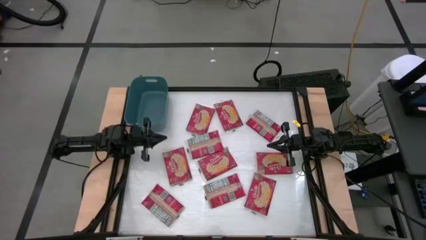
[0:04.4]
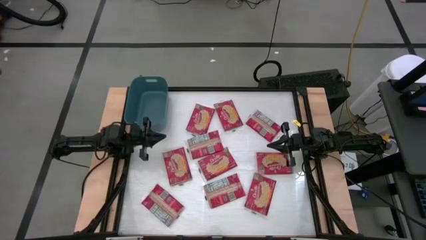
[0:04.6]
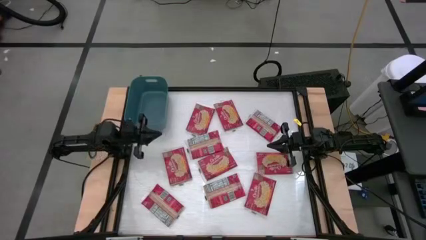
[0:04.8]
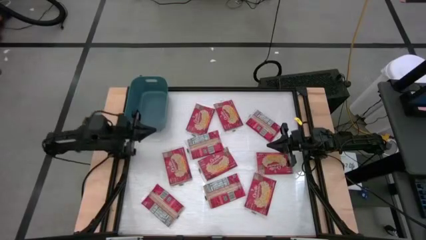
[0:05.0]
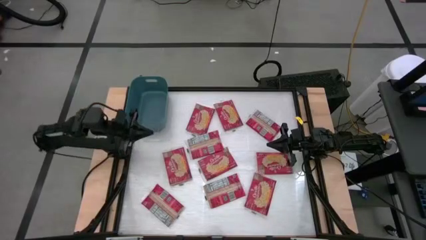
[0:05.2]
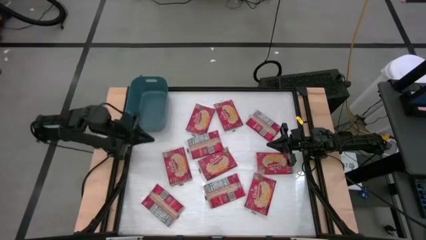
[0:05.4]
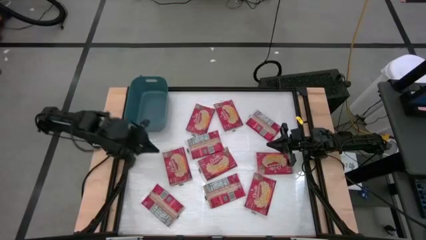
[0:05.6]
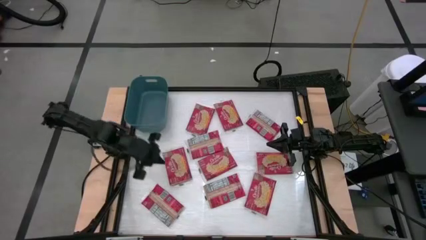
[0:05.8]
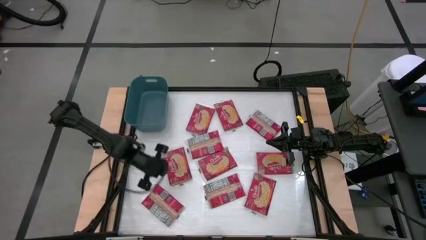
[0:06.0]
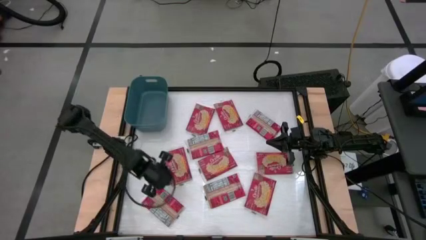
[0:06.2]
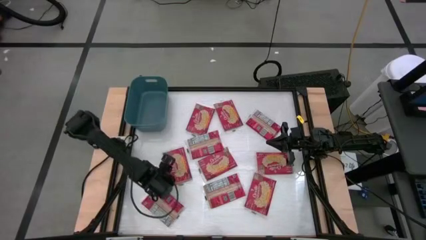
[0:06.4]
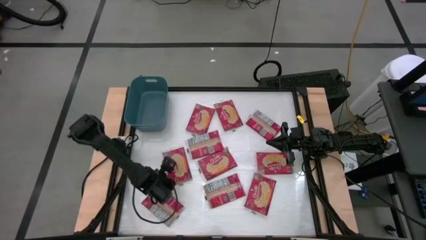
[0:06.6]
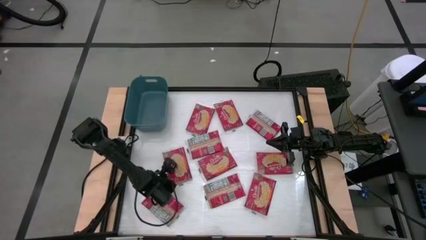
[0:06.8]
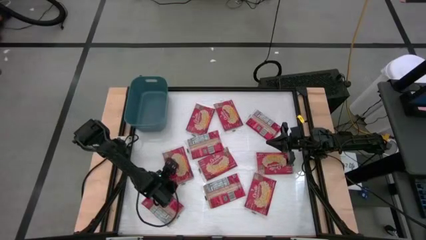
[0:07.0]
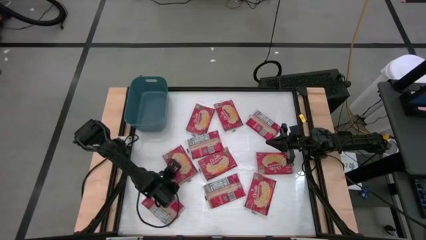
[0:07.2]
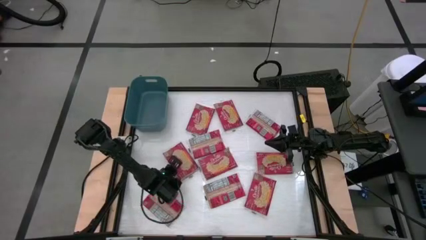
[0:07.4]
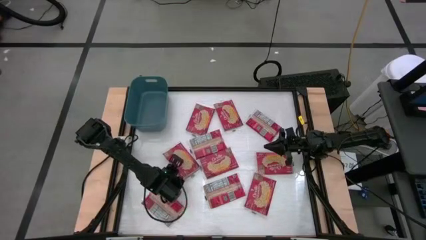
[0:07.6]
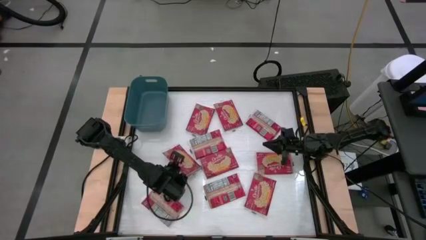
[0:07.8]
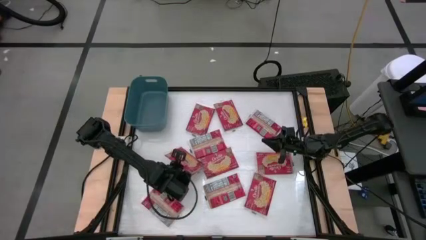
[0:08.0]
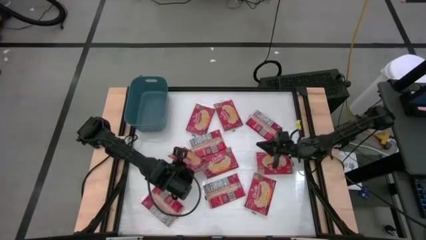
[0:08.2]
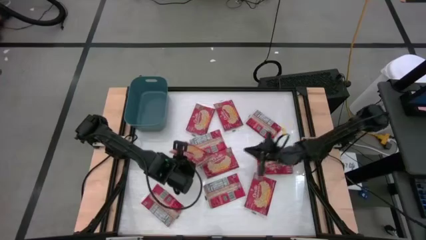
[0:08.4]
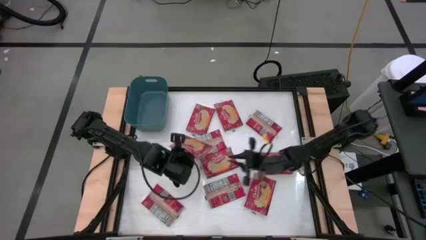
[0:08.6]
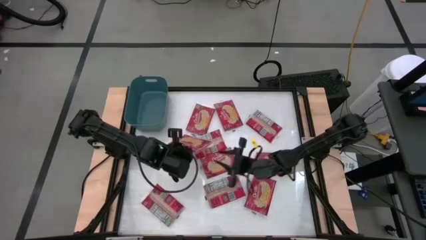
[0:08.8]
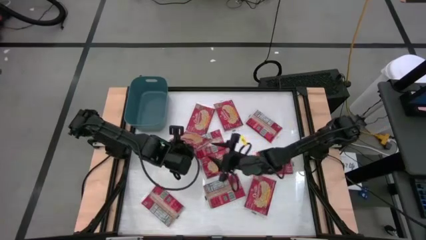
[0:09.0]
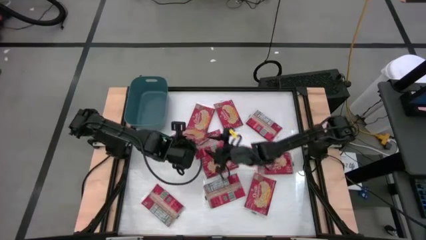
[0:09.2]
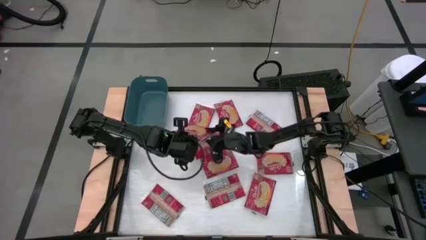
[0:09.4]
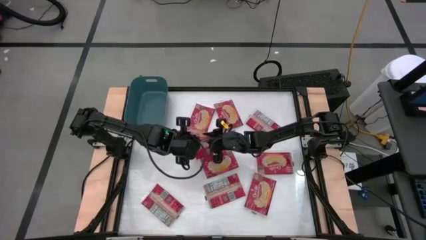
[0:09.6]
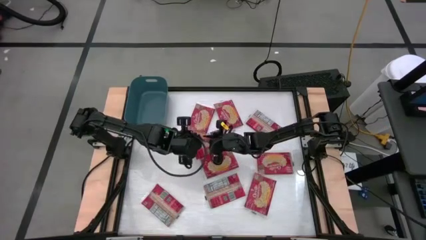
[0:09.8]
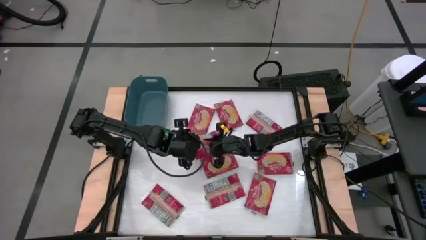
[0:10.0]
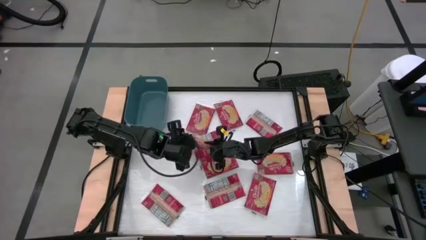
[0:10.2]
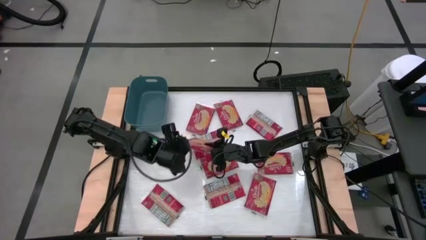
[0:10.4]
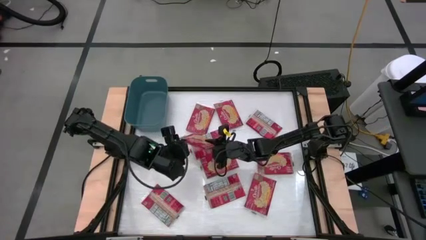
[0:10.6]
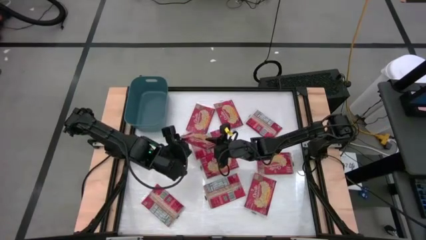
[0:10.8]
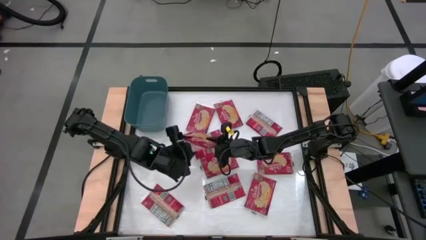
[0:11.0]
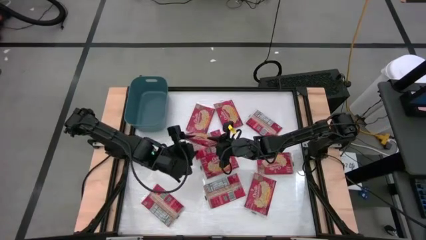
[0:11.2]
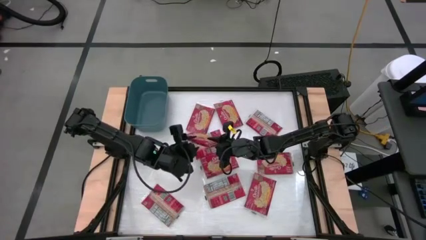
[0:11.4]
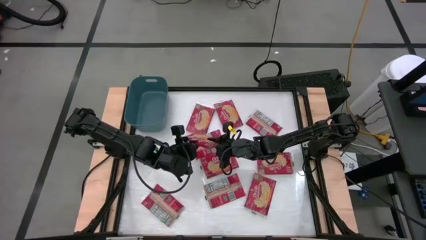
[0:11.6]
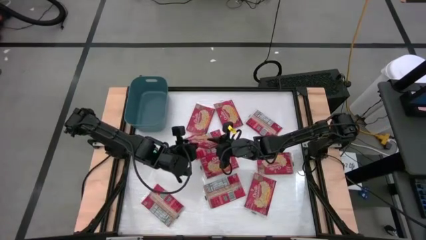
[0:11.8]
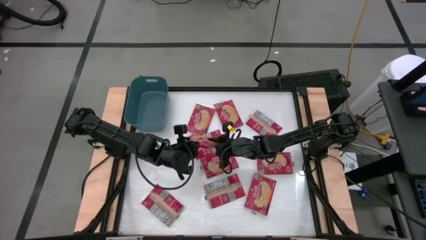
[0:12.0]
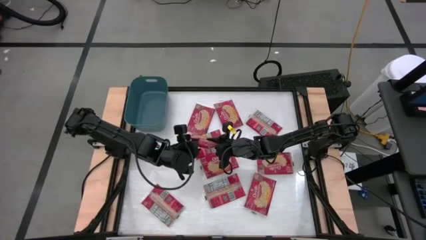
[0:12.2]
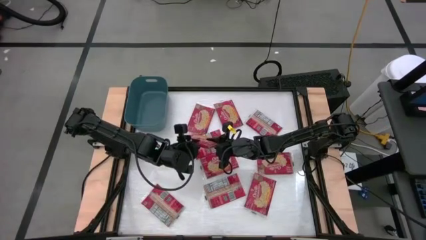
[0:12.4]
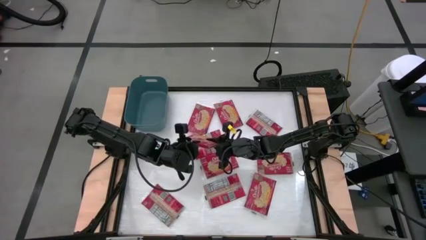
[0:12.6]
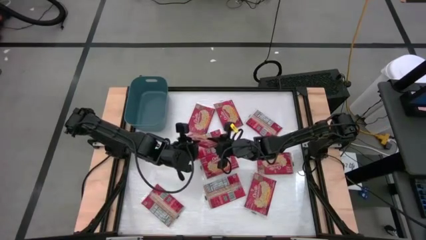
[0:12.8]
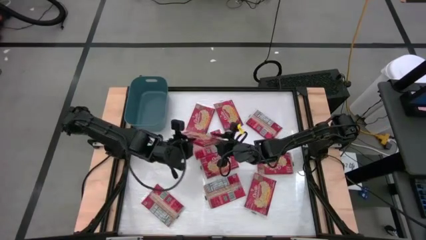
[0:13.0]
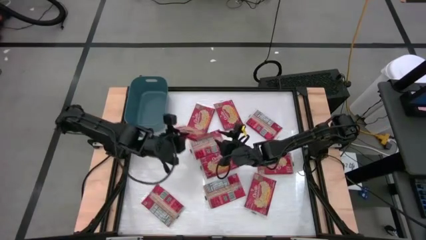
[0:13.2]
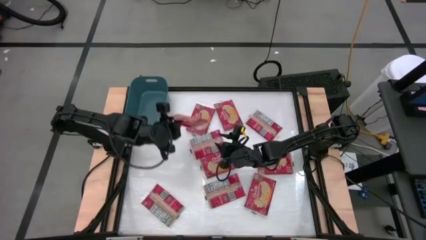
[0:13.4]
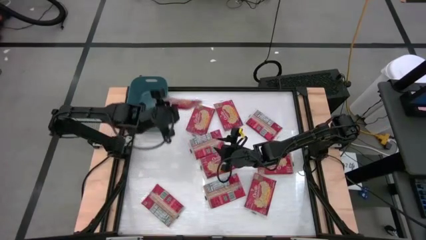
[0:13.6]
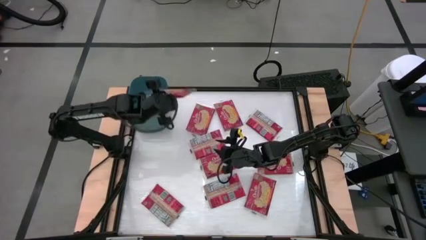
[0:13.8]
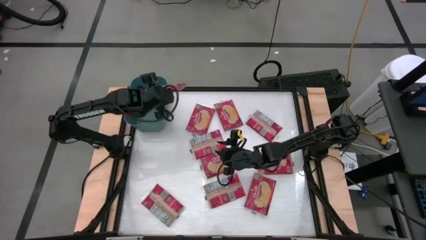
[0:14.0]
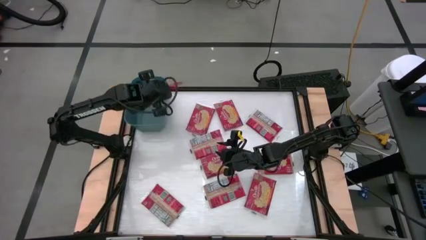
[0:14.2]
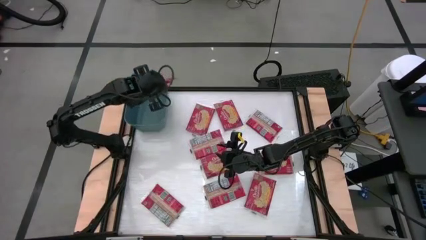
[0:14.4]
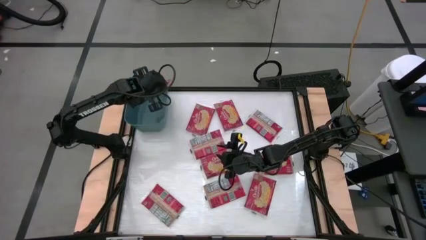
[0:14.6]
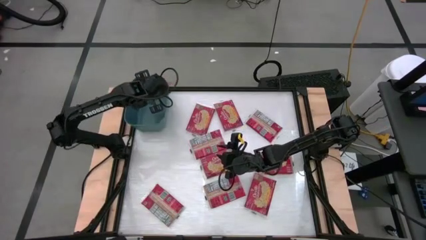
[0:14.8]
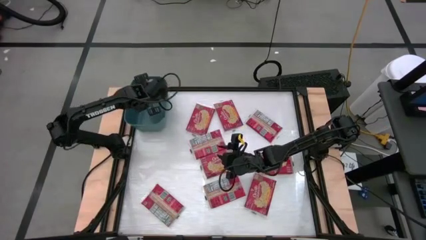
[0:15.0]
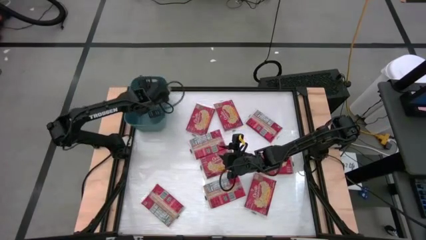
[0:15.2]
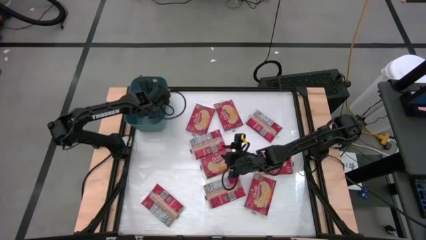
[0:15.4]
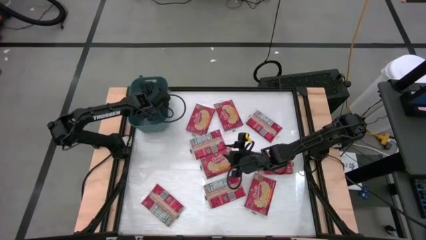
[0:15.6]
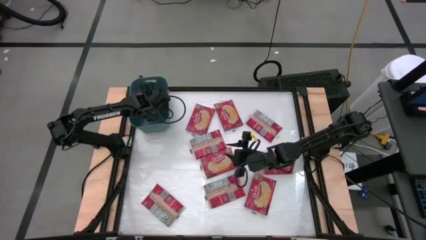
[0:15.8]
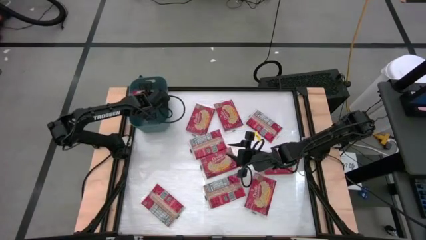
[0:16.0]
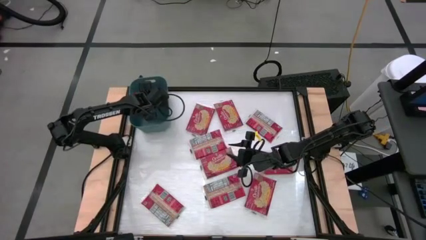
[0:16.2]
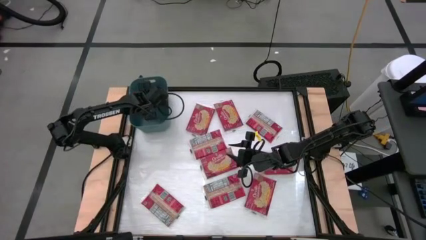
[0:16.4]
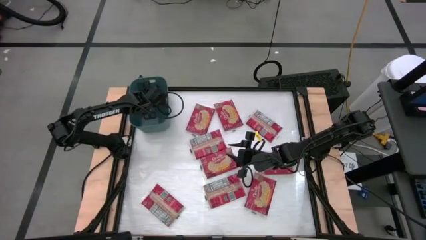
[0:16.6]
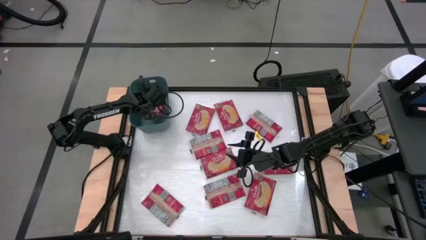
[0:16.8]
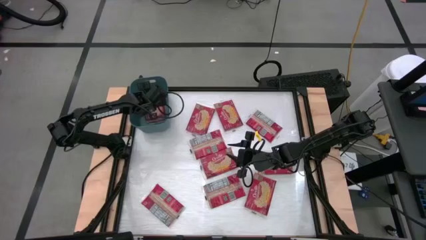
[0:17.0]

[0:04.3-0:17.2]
Task: Sort popcorn bags into baskets
Put the red popcorn bag into the blue bin

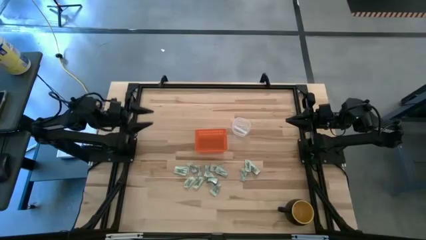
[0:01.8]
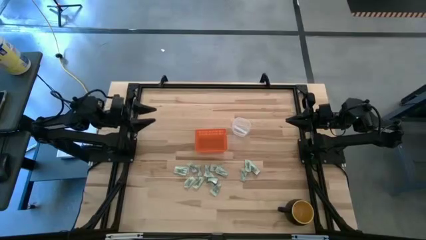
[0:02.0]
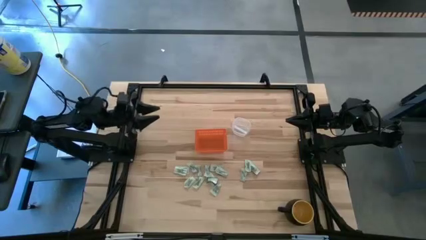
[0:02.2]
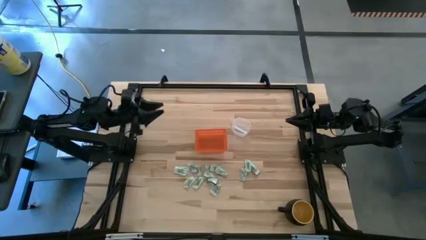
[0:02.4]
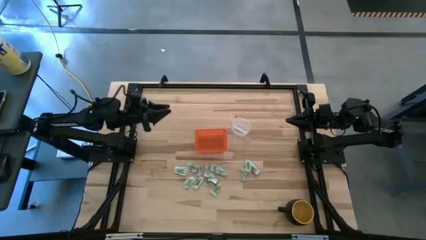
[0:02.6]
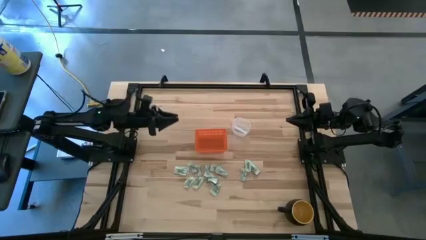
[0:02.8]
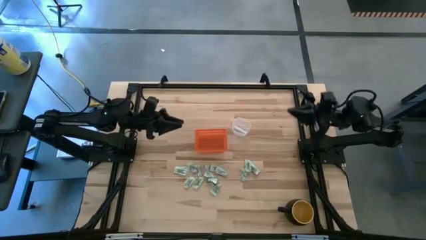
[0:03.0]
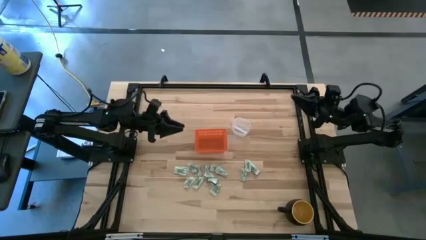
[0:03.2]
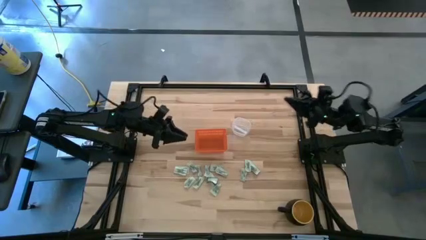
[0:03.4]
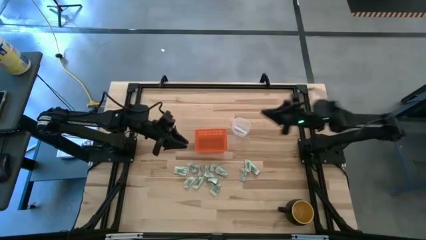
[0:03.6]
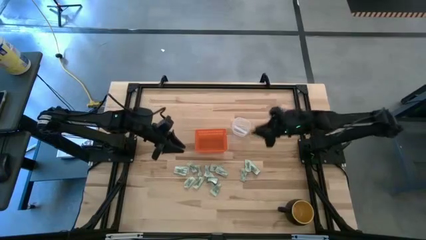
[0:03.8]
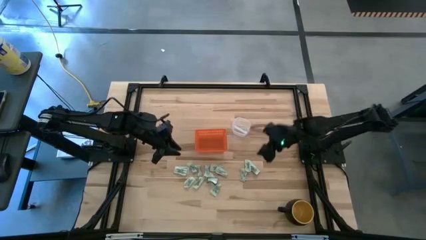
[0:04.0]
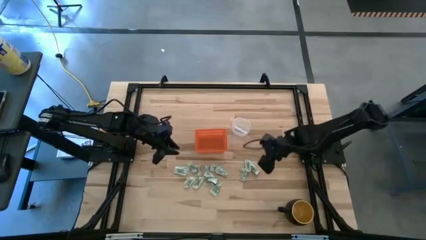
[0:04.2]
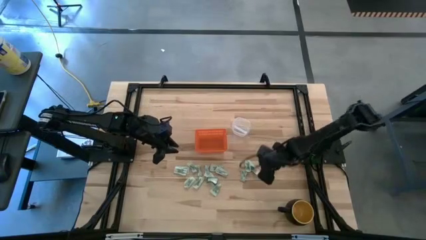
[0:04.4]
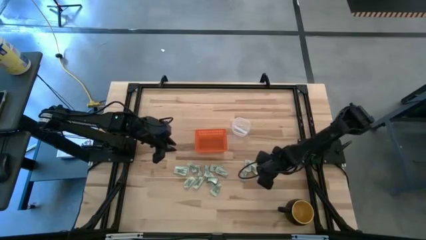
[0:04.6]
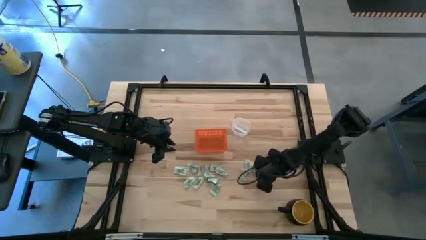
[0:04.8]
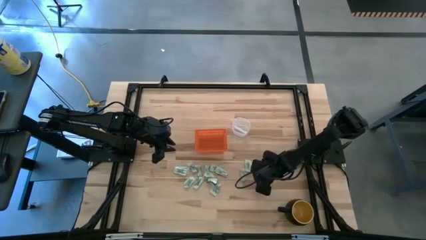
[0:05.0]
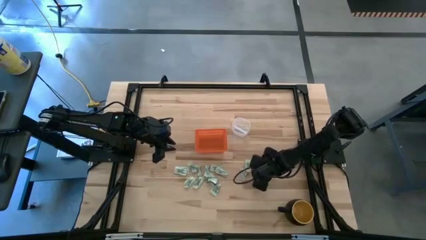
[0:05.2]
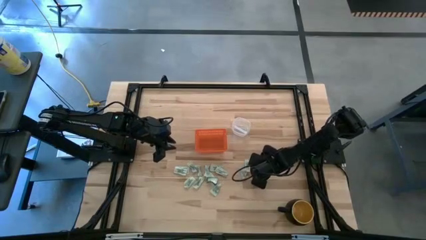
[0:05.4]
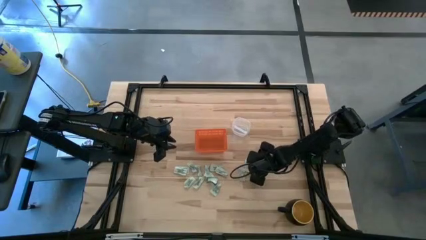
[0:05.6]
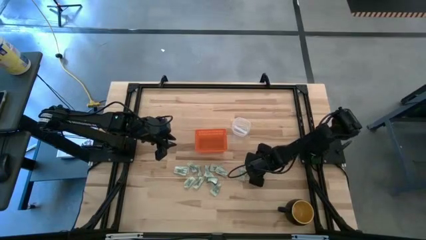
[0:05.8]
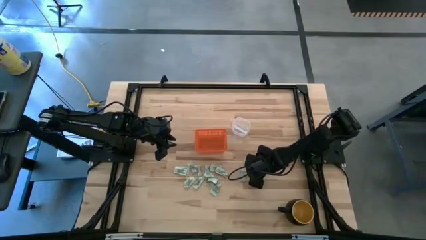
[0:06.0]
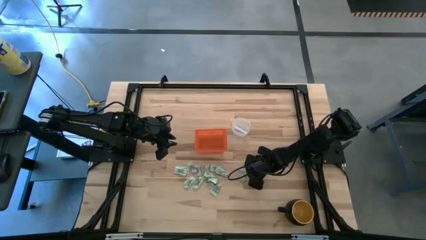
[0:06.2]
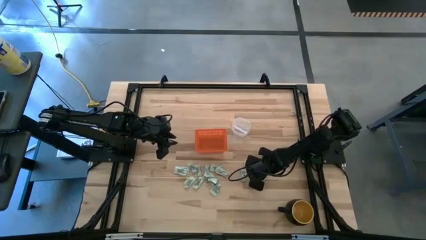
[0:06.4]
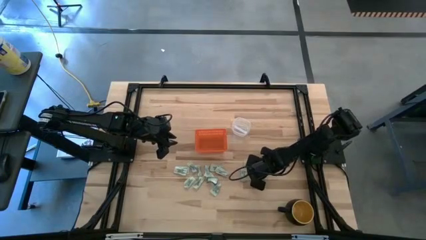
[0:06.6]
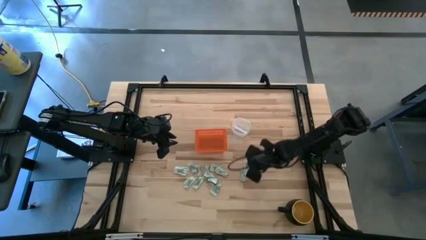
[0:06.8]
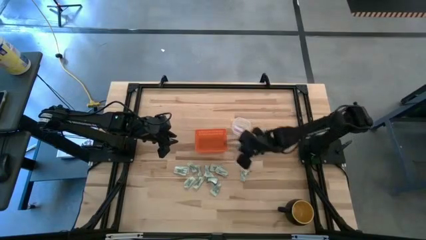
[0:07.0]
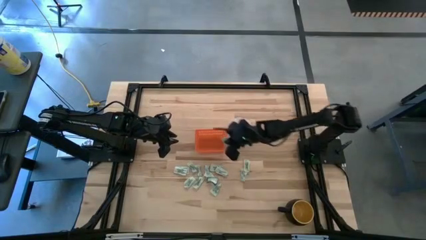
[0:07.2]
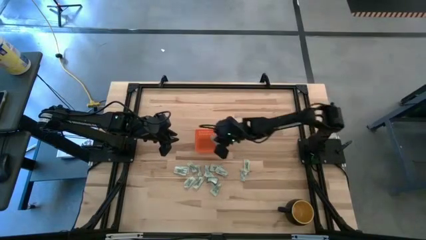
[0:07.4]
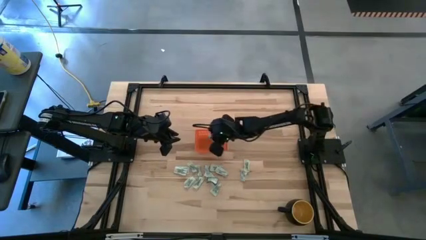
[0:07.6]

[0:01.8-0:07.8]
Task: Pick and place Stevia / Truvia into bins
Put the stevia packet into the basket
